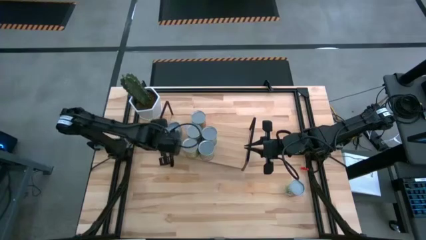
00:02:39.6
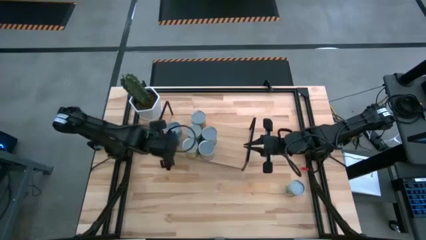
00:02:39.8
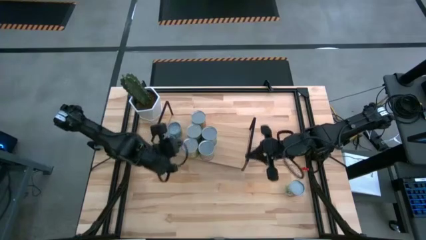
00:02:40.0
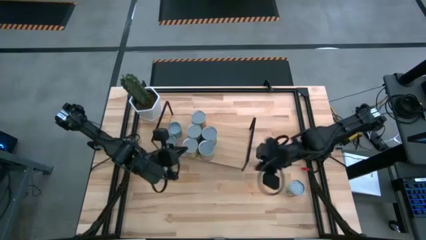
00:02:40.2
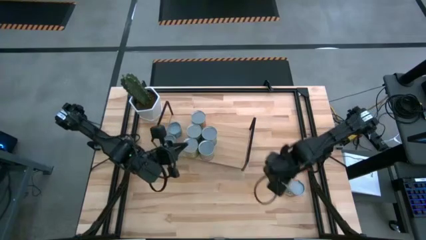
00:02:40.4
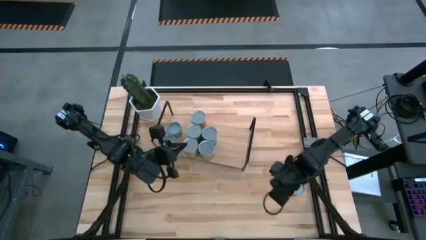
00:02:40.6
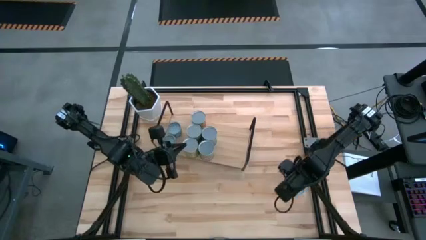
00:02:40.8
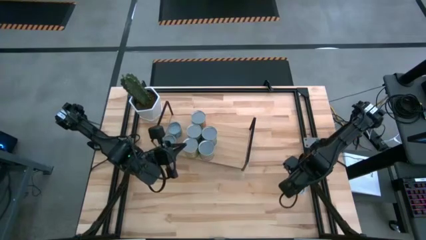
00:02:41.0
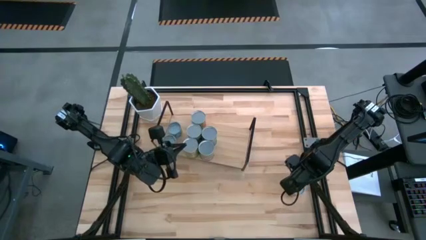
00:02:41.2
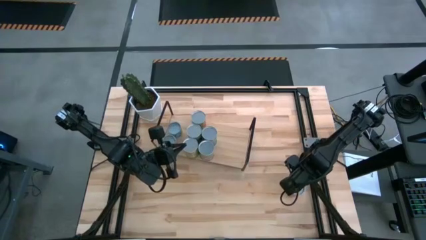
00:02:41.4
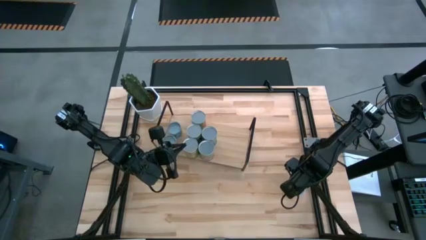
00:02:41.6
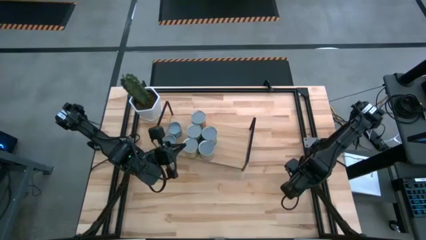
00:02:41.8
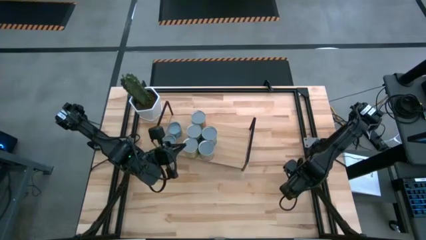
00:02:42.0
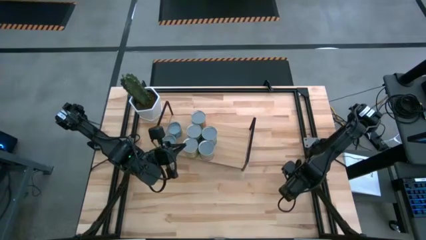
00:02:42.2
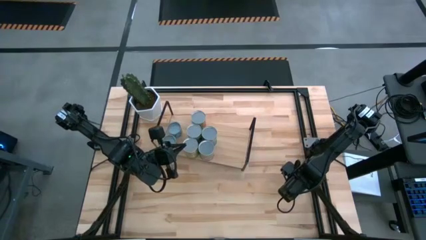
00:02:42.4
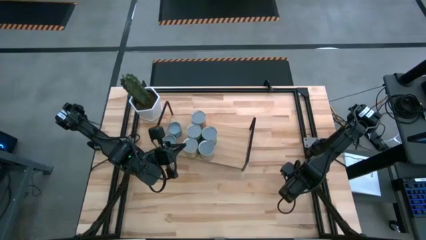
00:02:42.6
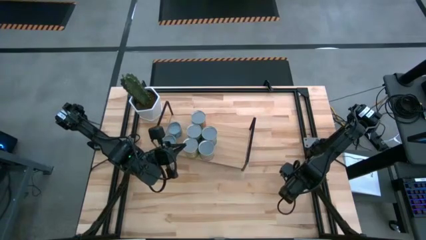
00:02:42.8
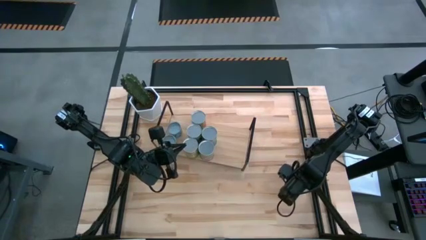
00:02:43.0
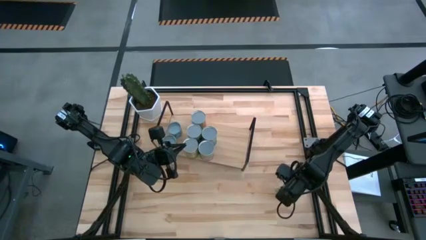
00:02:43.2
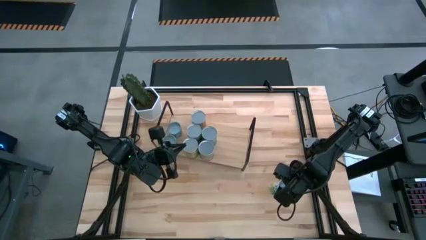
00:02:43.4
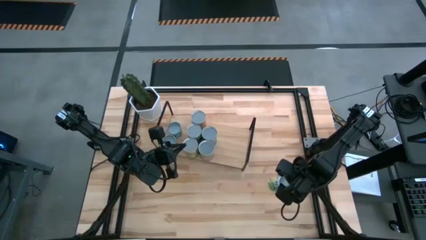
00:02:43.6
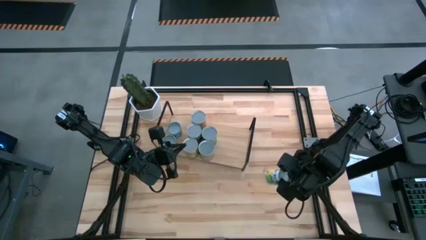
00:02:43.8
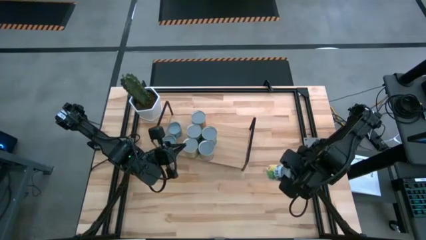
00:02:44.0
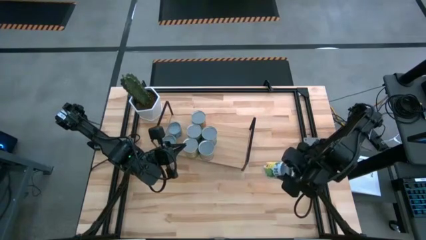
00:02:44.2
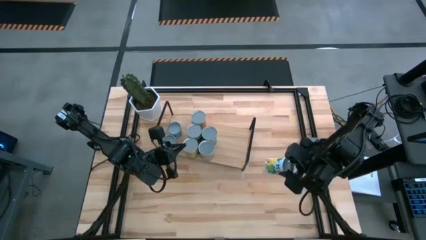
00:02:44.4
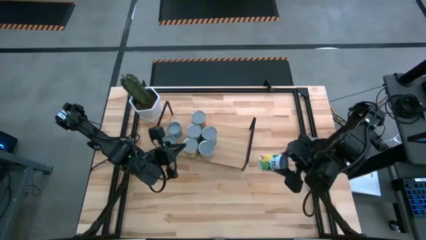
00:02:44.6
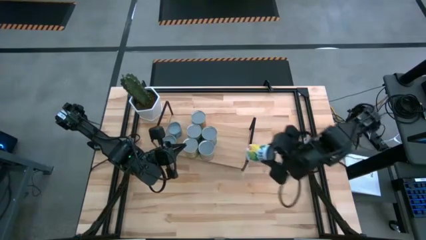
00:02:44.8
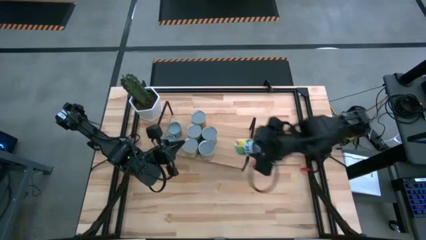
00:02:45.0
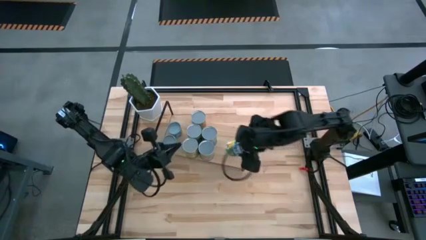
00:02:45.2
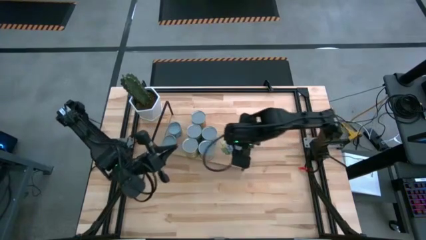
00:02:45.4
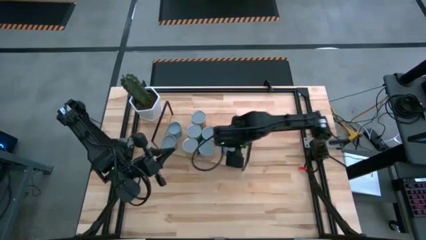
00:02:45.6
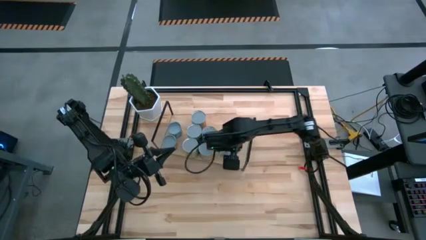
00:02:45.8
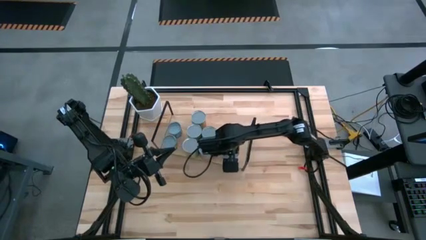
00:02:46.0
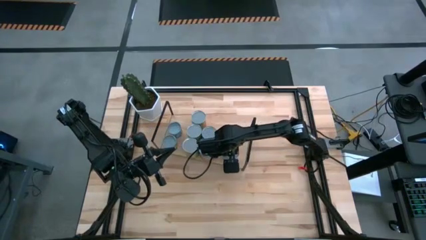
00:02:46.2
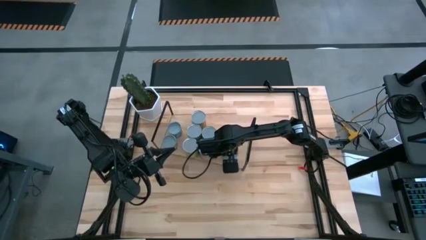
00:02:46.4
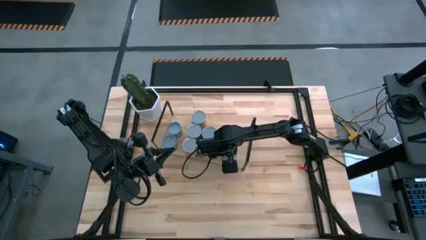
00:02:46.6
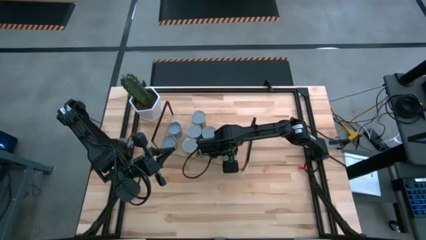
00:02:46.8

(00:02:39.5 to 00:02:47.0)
Task: Pick and place cans onto a shelf
Put the mixed canned fruits on the shelf

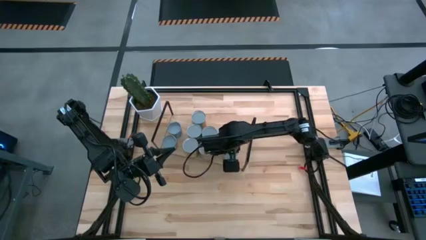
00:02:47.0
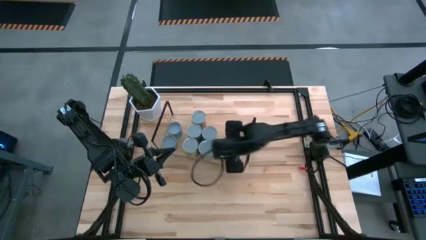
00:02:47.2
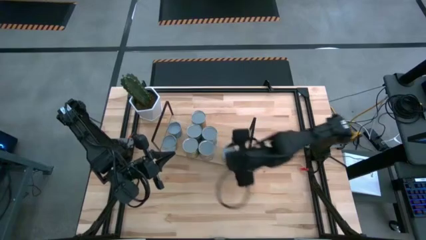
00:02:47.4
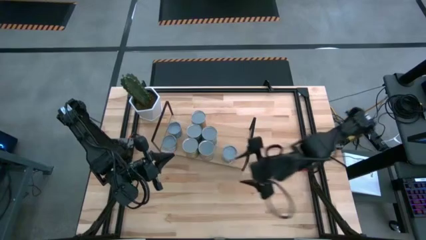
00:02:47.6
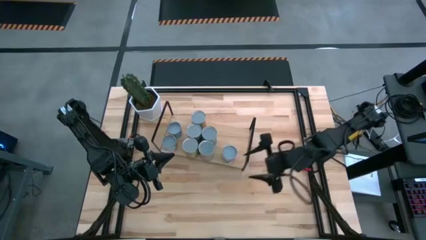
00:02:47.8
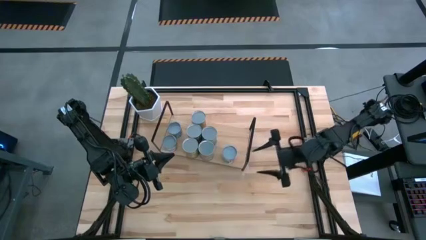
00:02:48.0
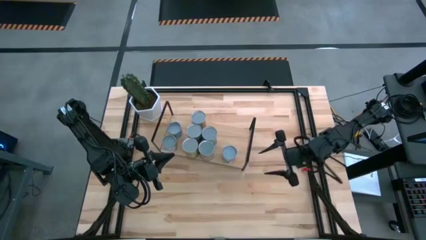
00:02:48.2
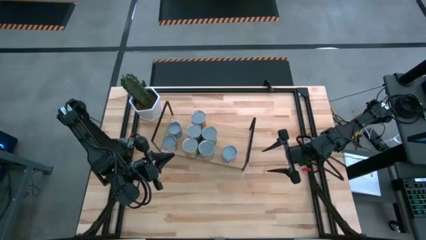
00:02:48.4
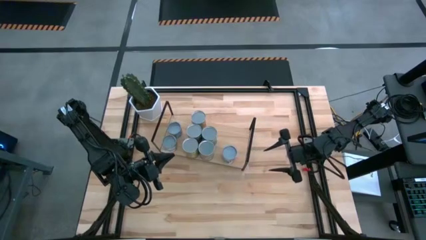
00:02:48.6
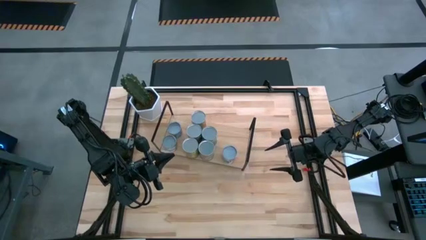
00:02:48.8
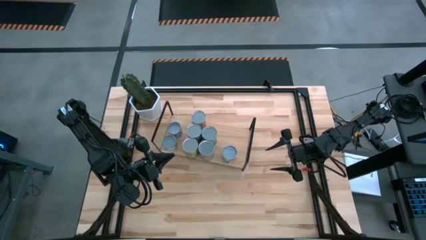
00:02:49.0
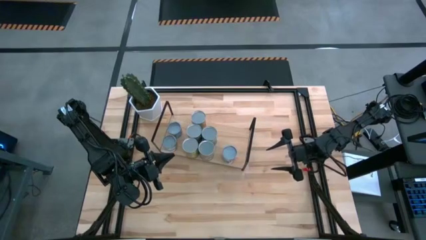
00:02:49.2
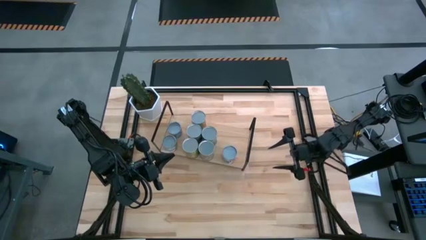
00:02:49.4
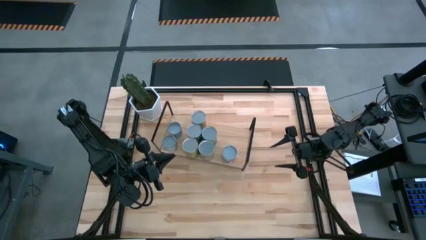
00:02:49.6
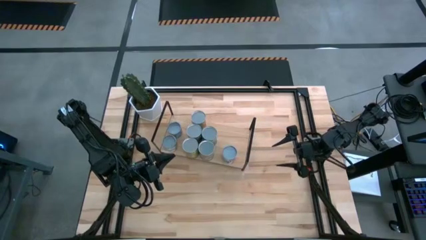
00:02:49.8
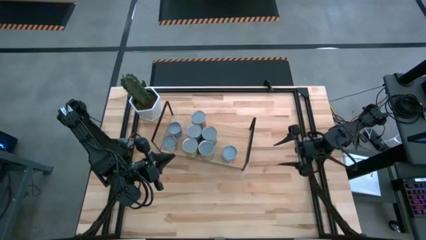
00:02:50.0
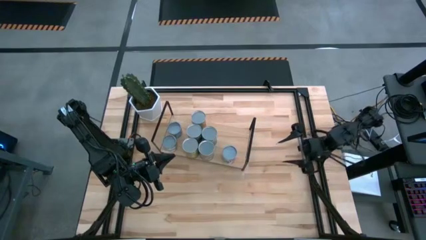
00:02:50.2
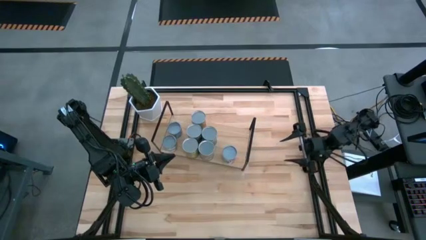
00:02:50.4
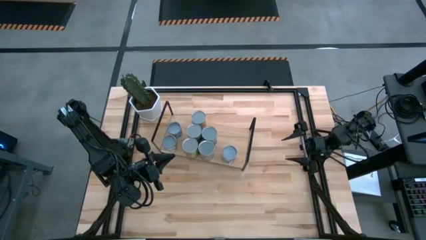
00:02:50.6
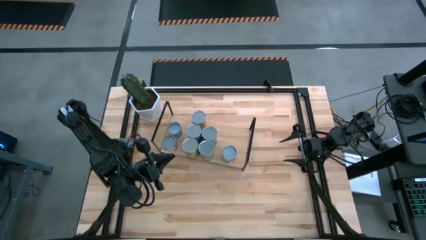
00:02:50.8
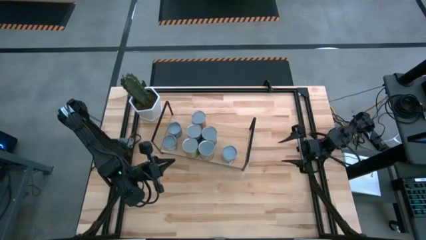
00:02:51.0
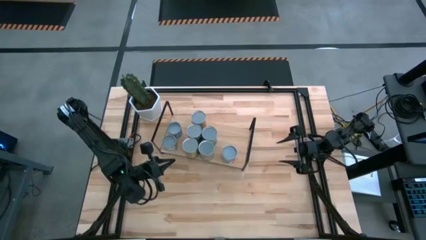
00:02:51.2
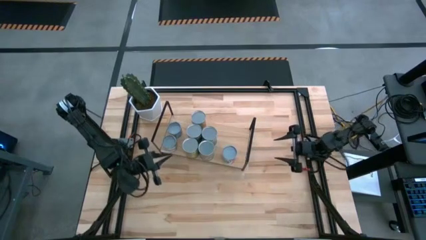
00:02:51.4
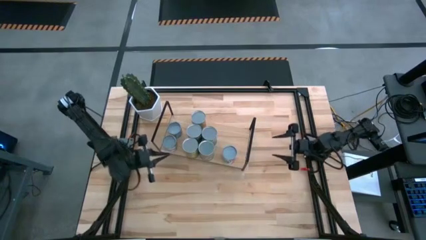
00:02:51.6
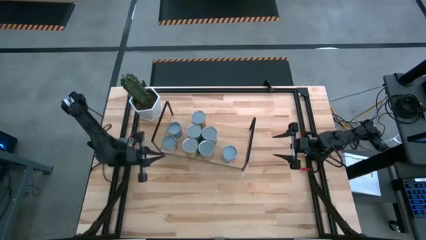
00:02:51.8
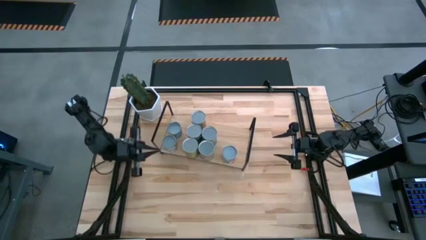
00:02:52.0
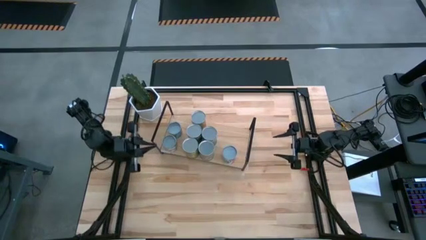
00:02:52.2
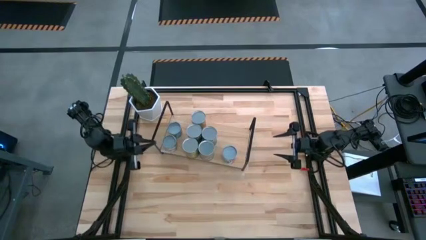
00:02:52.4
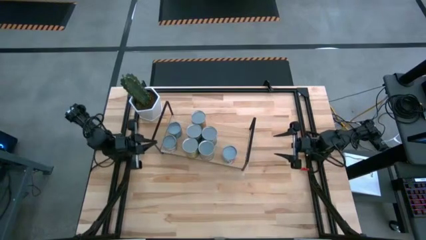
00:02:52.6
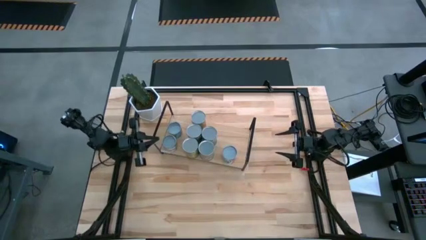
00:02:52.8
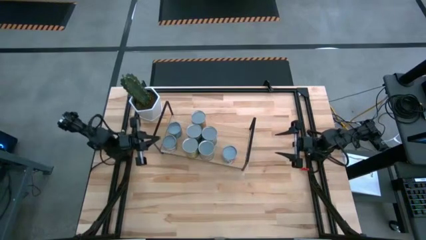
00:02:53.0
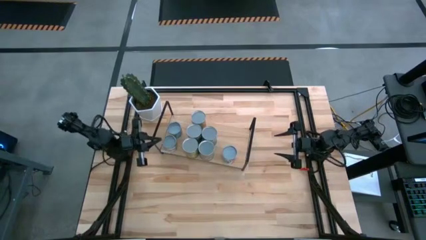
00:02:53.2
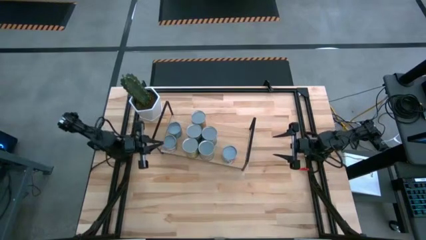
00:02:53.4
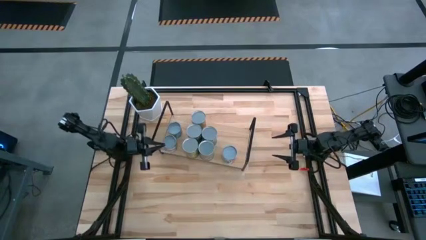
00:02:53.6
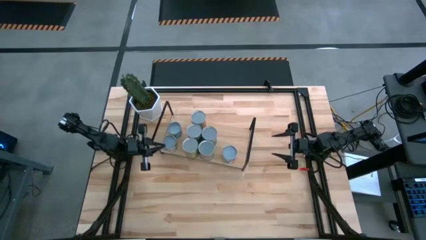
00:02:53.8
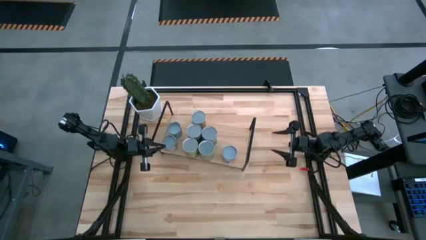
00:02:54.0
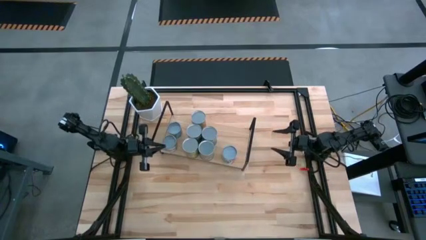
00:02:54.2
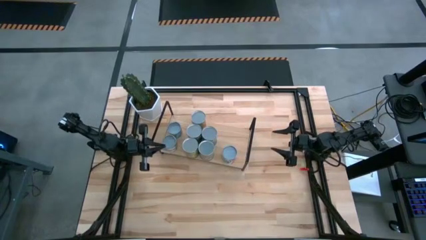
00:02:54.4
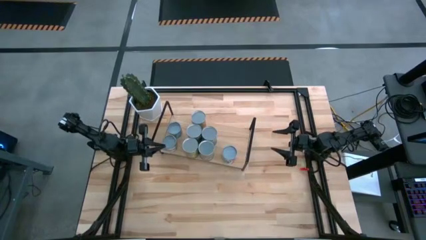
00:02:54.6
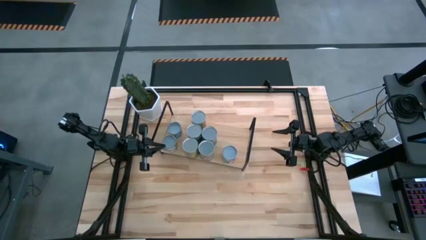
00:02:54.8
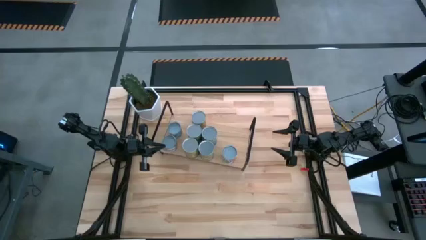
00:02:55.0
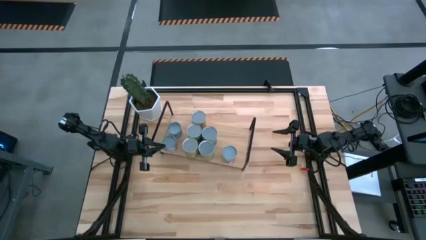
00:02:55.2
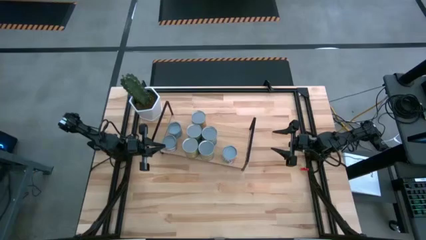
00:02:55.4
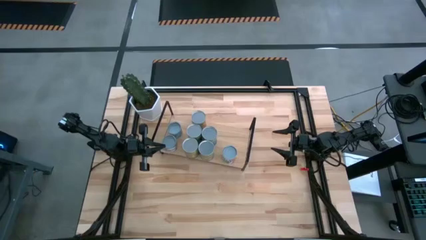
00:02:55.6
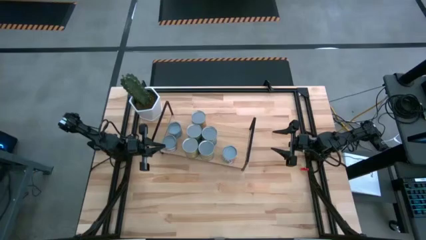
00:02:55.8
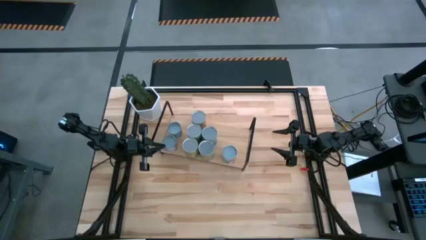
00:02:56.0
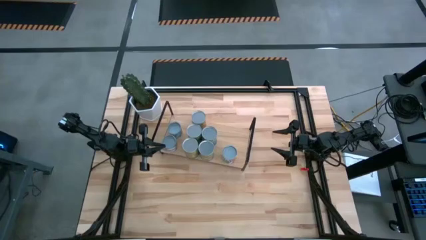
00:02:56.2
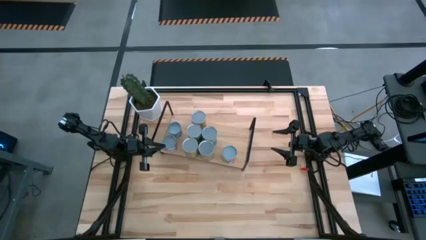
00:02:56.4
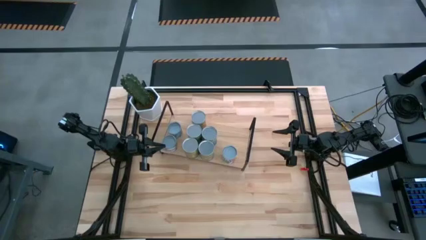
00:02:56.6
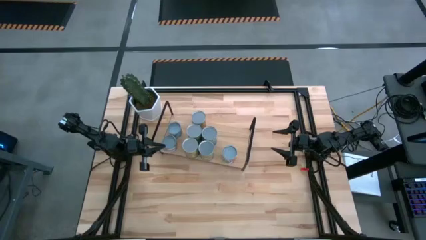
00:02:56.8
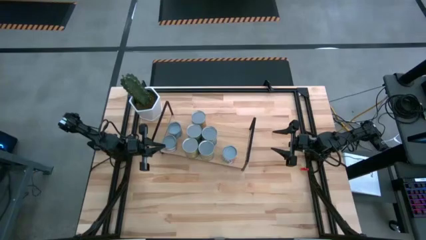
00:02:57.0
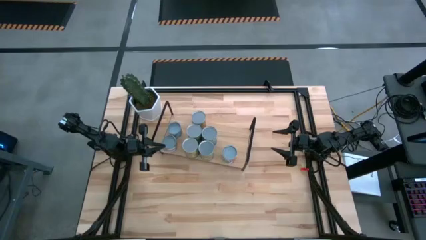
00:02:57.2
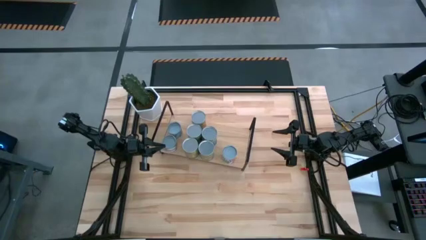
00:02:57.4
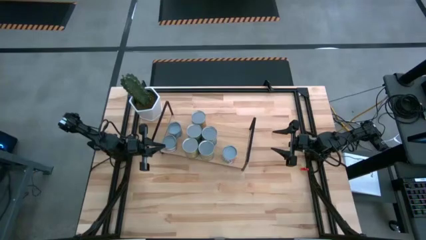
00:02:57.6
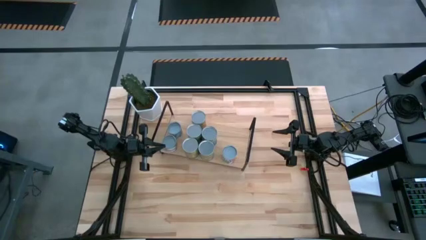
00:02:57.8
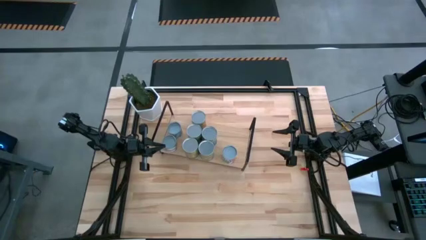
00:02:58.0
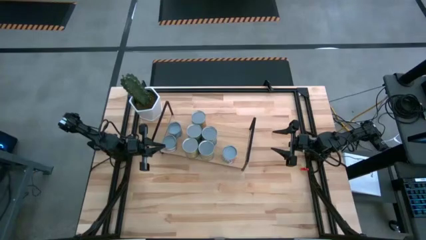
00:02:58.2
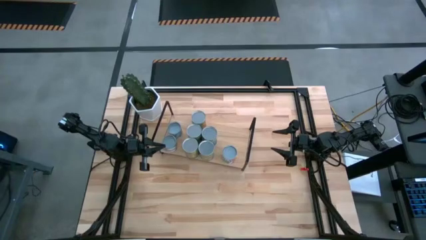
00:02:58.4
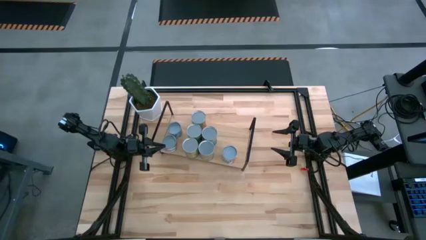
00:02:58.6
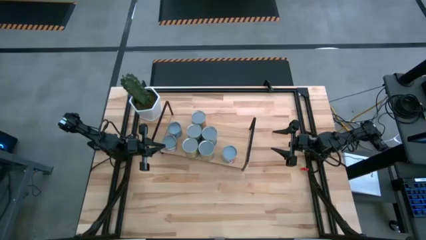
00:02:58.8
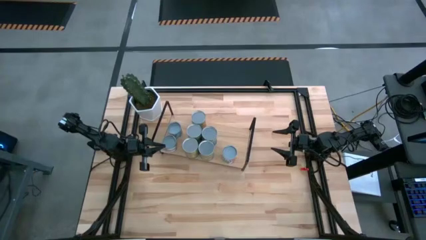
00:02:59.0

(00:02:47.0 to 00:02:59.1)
Return to Home Position
